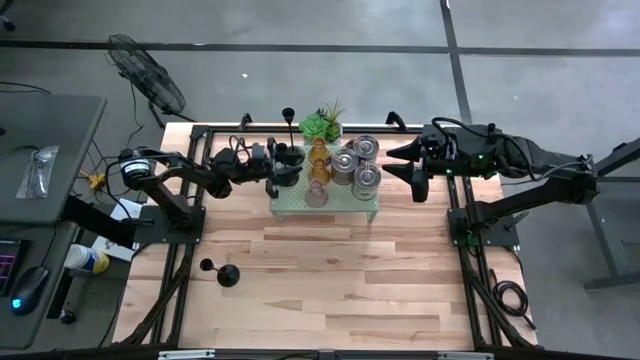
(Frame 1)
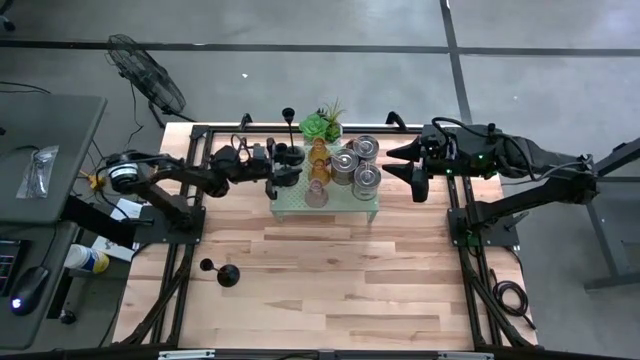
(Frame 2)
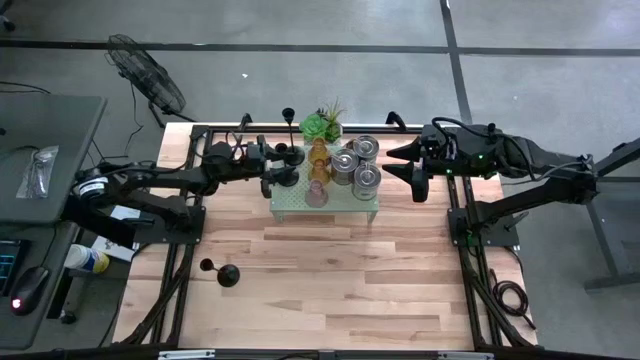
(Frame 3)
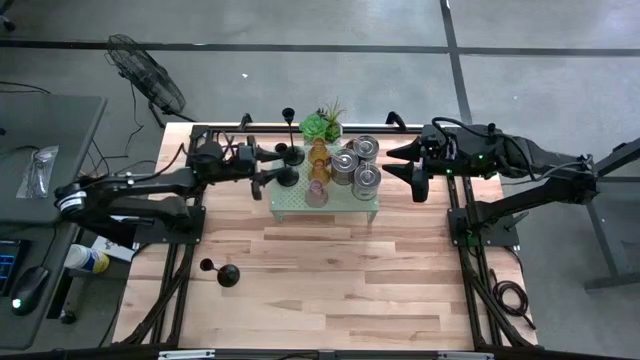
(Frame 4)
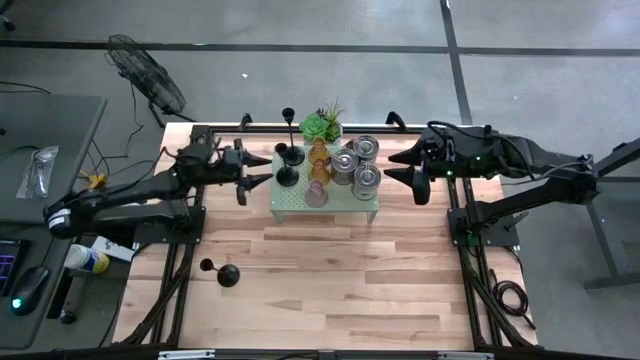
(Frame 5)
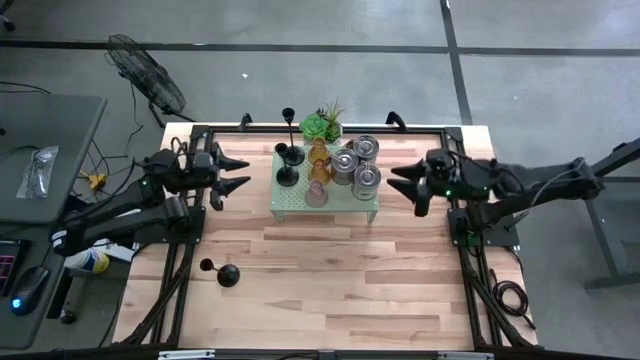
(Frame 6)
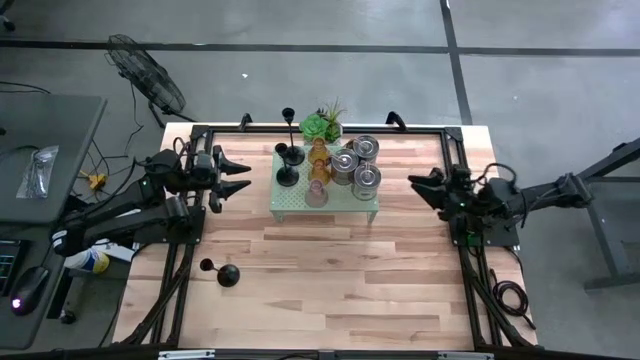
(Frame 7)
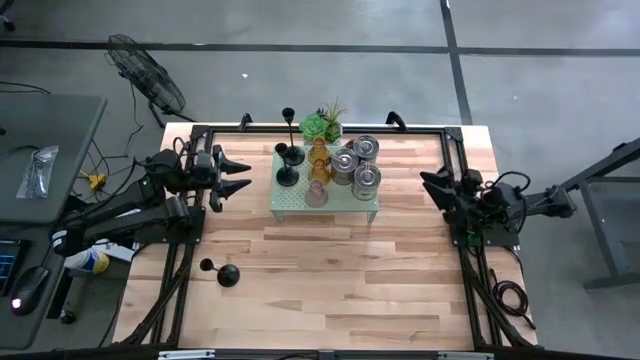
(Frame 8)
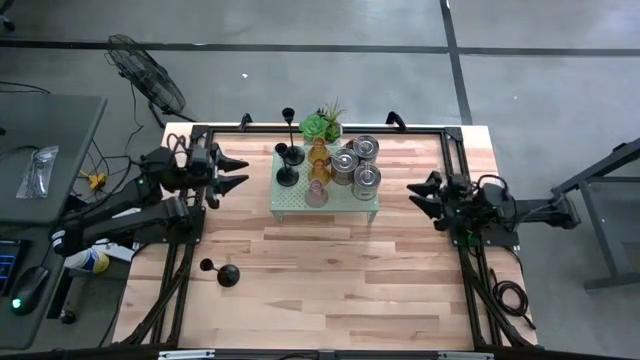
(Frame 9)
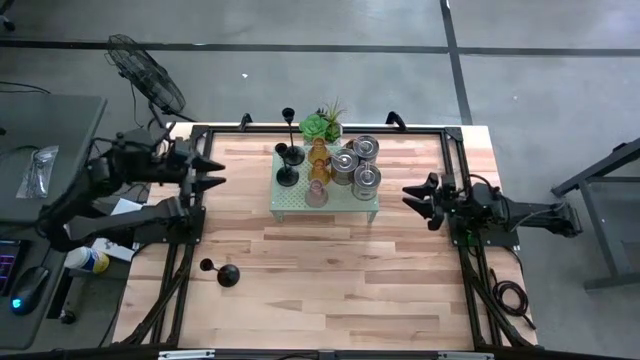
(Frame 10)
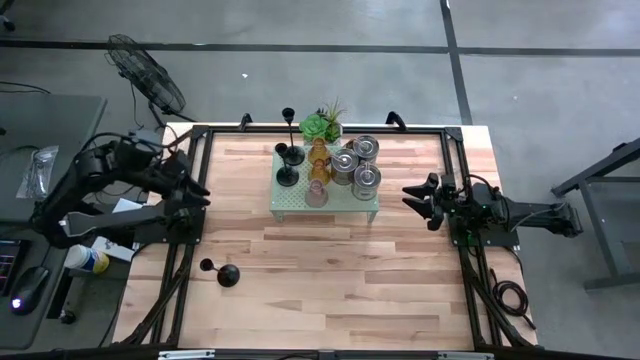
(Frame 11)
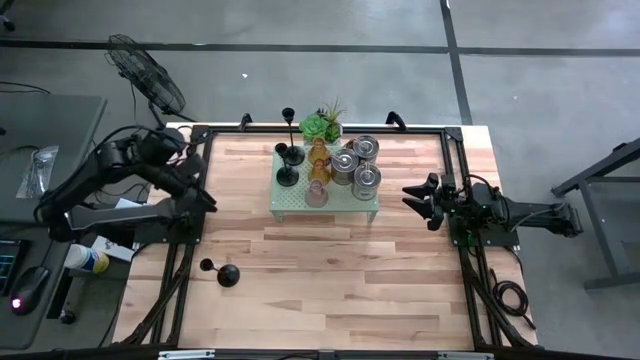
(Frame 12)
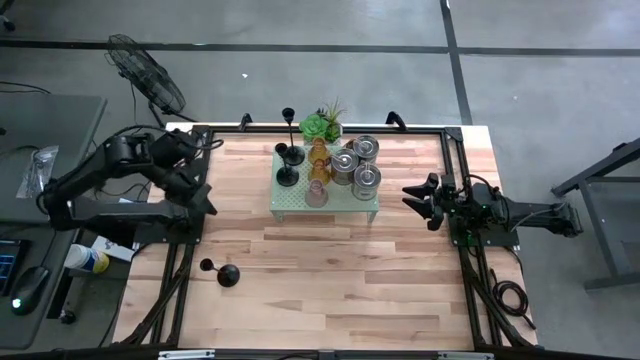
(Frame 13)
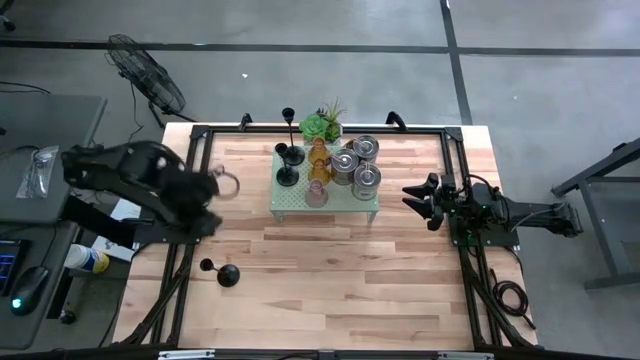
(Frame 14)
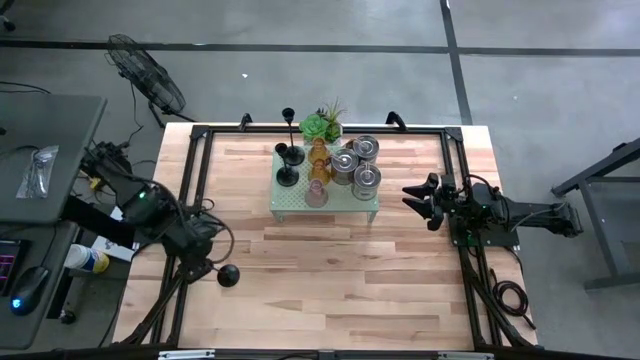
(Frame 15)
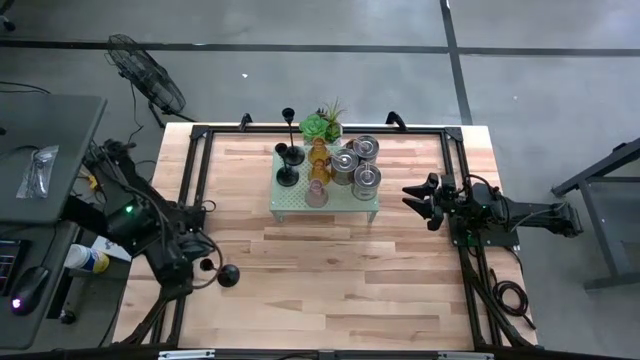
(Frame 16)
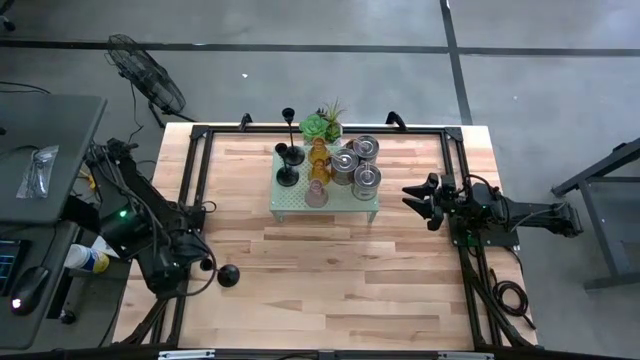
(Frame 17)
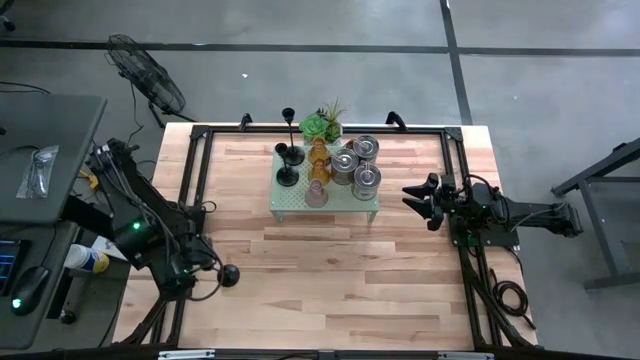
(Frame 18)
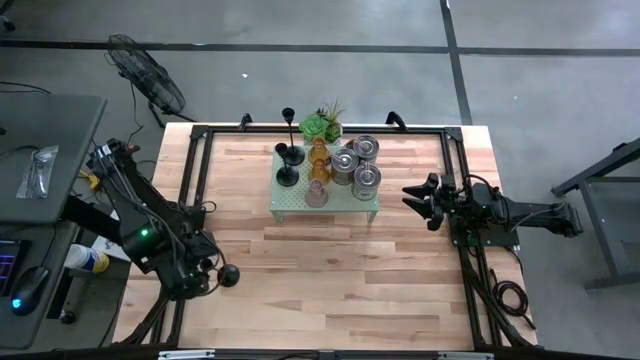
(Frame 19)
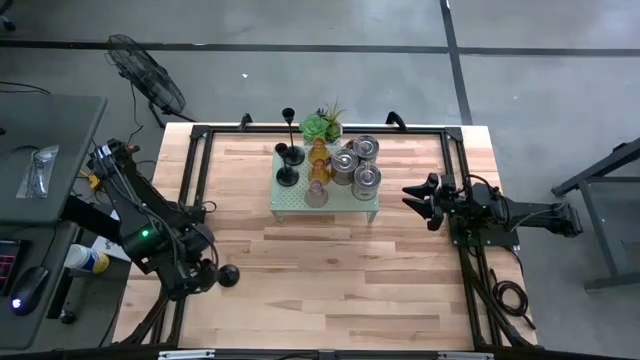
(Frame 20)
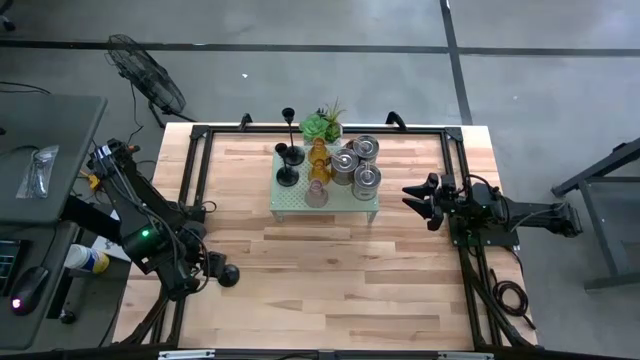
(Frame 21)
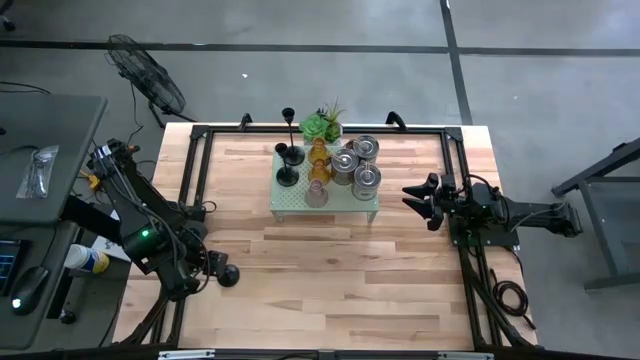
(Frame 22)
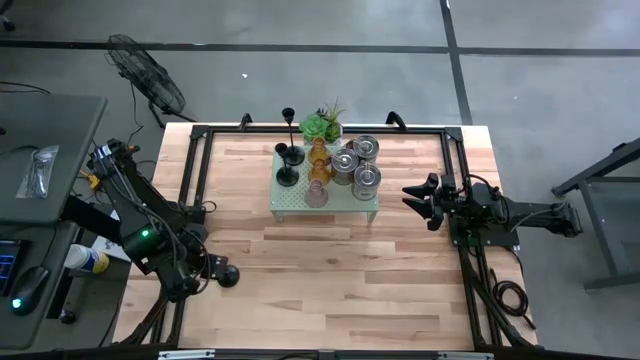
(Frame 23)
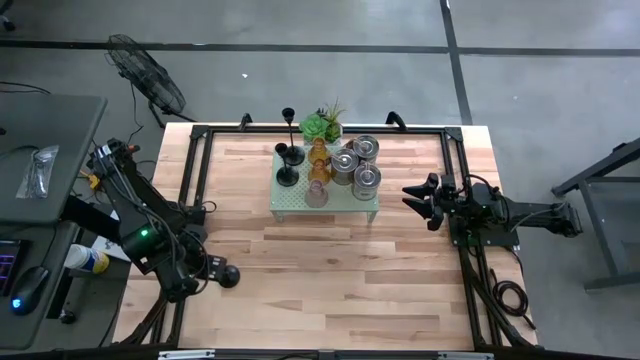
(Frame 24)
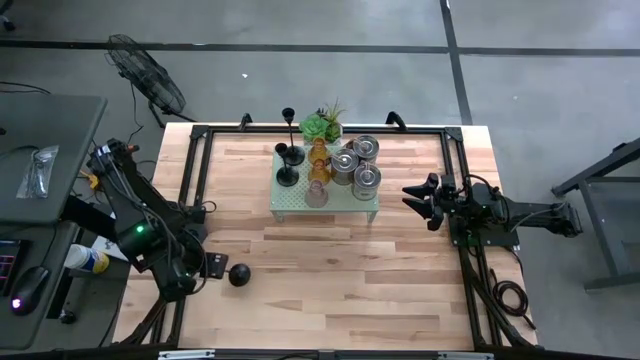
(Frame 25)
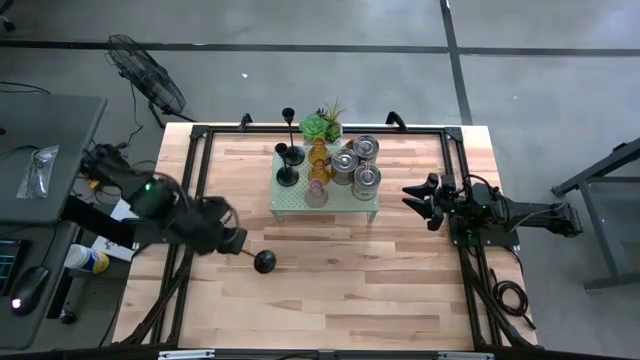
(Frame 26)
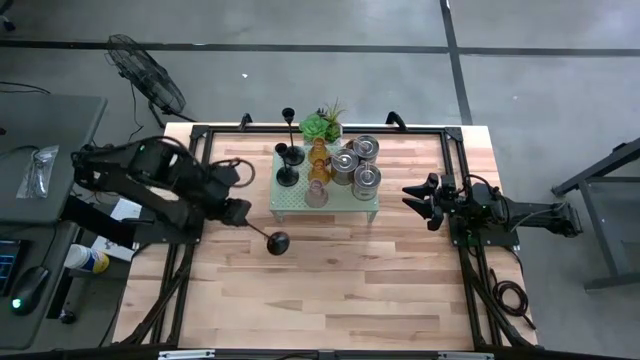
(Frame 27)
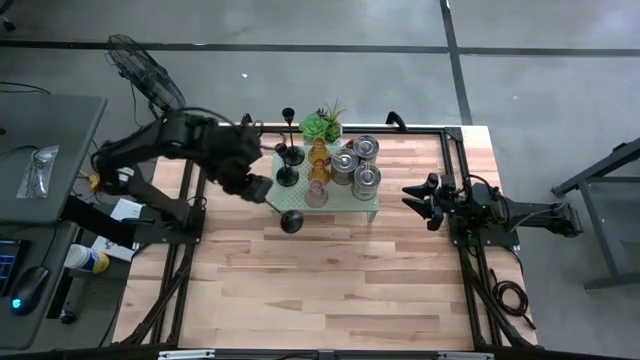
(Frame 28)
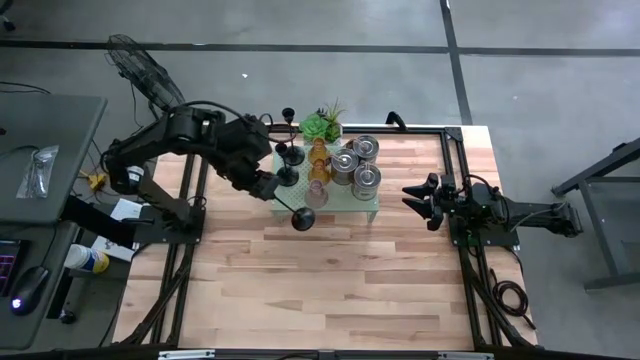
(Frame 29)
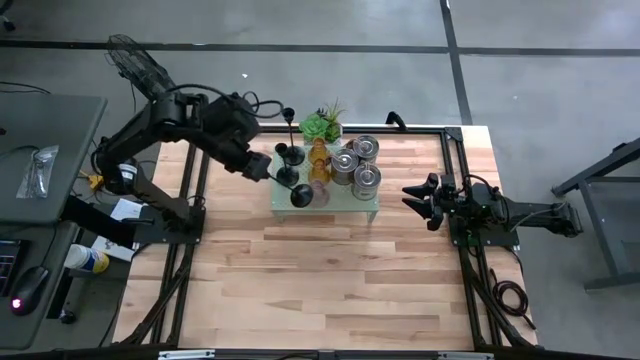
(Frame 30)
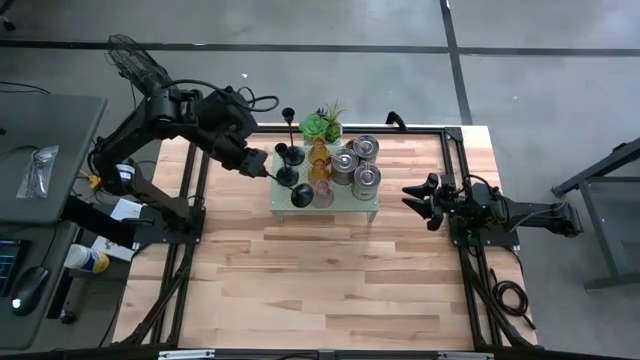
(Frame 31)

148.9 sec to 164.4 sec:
Task: Pick & Place candle stick holders
Put the black candle holder on the shelf

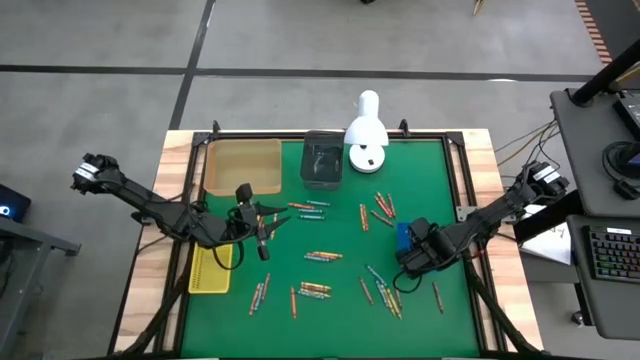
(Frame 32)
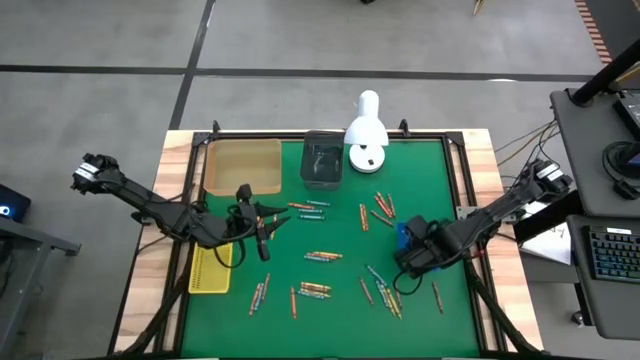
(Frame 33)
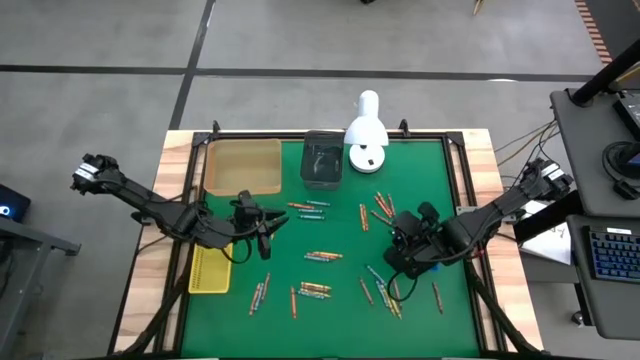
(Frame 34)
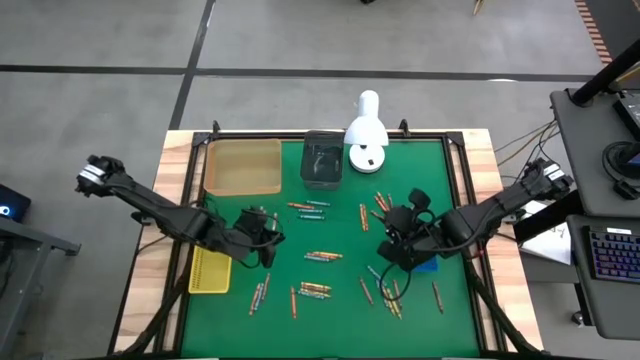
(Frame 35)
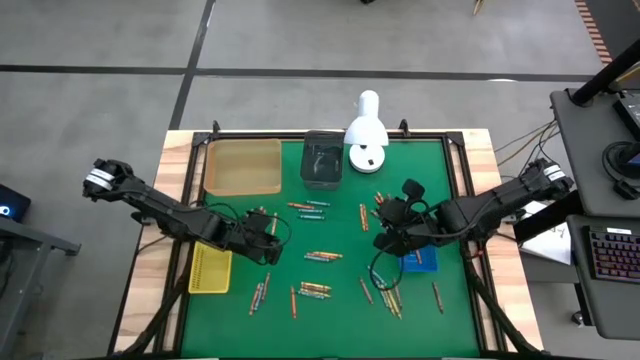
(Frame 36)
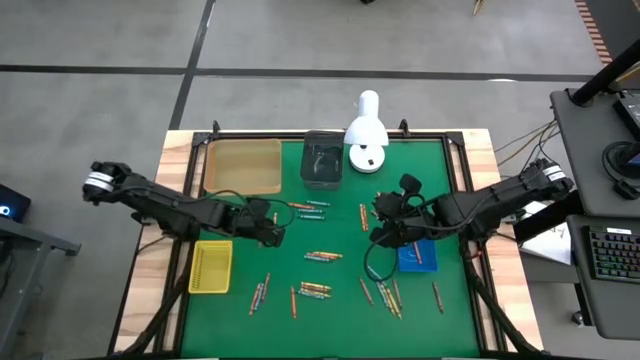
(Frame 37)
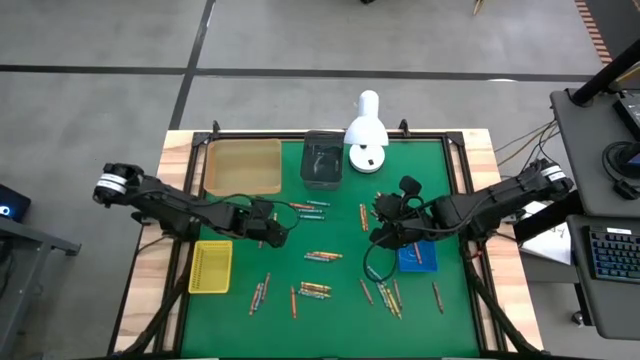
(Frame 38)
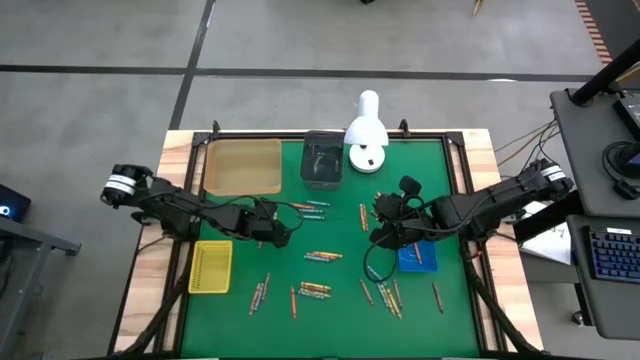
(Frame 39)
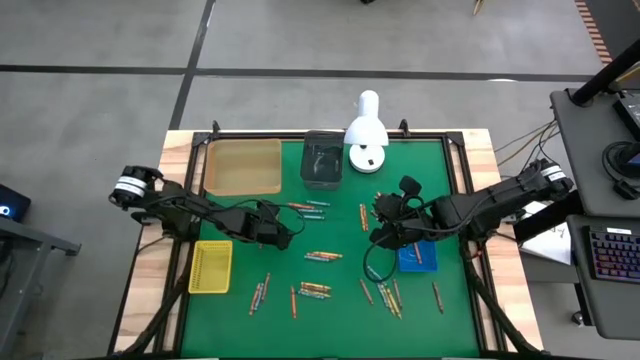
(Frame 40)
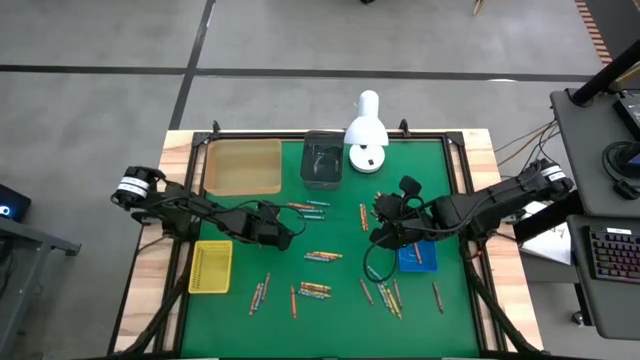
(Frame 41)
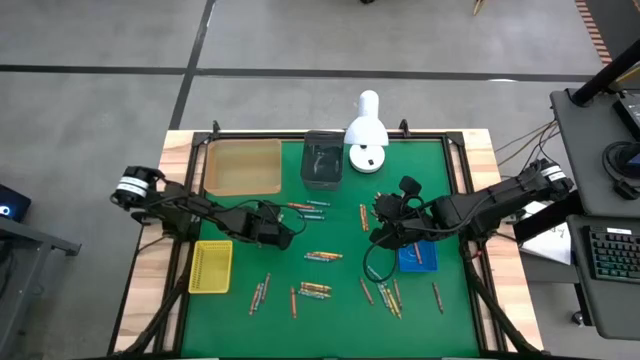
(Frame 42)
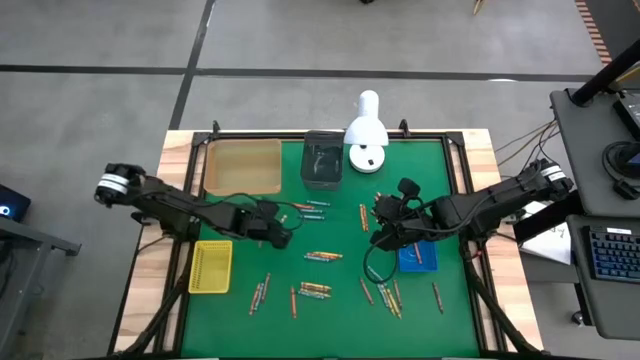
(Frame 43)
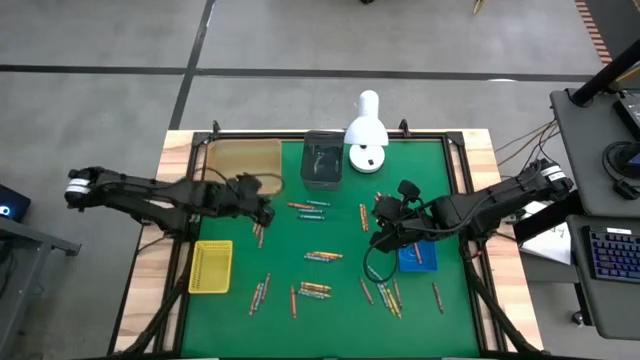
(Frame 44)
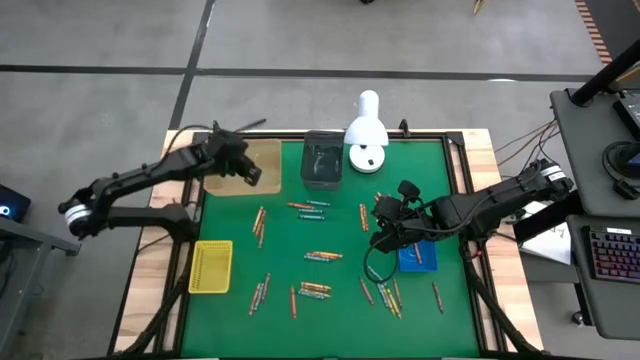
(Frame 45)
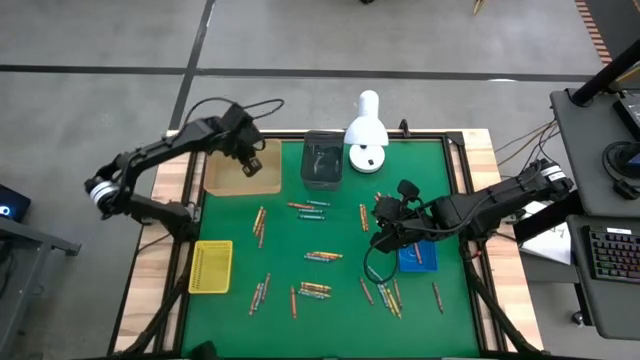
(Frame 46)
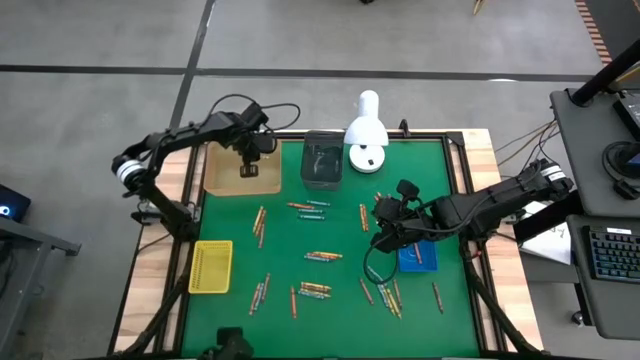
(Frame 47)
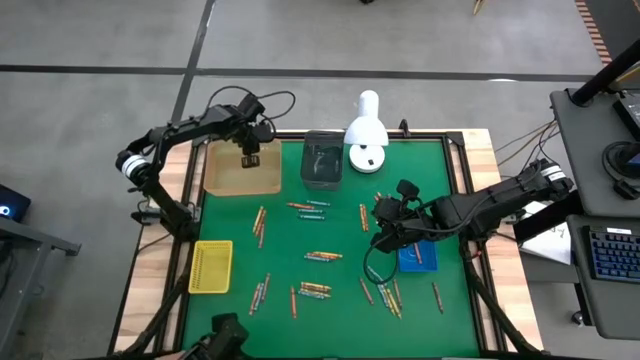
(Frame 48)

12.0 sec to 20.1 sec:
Task: Sort crayons
Put the green crayon into the orange bin
